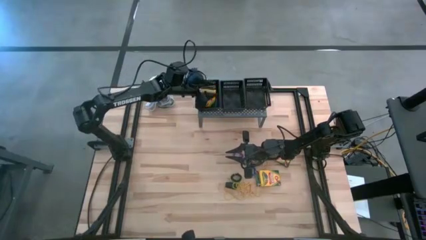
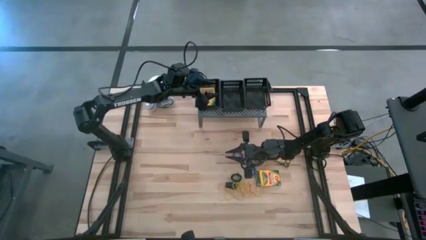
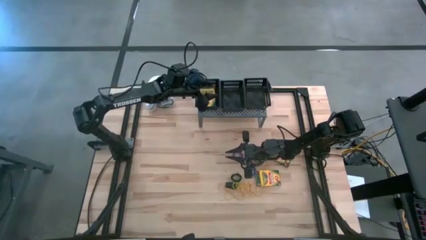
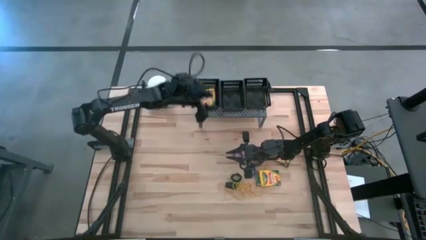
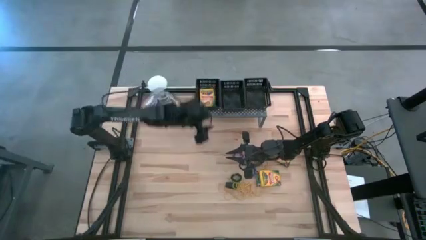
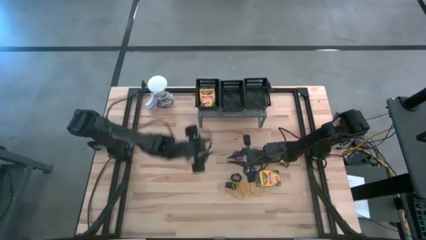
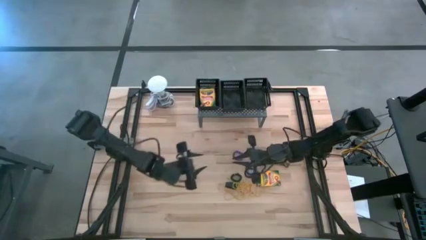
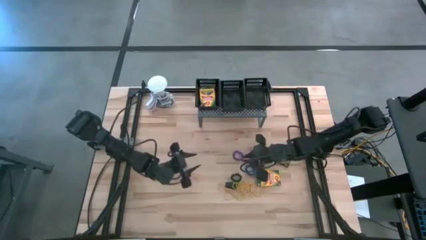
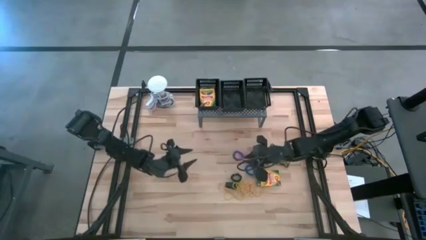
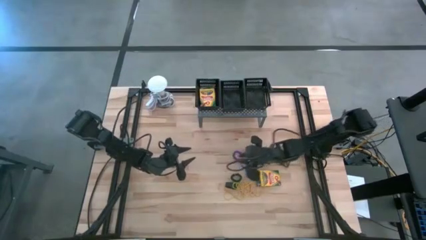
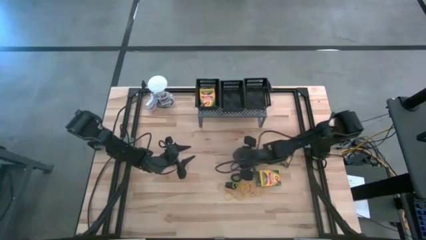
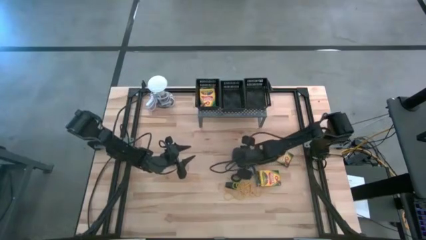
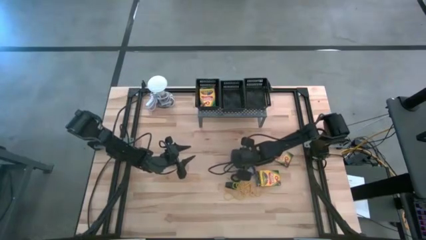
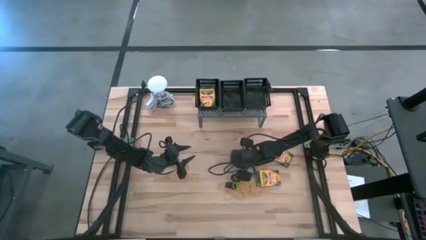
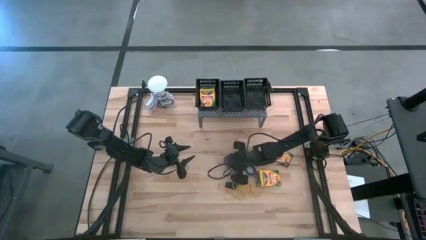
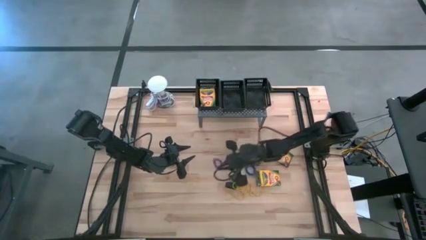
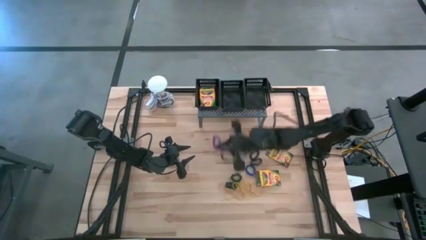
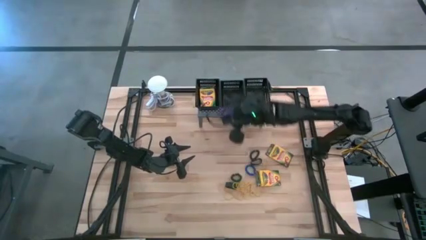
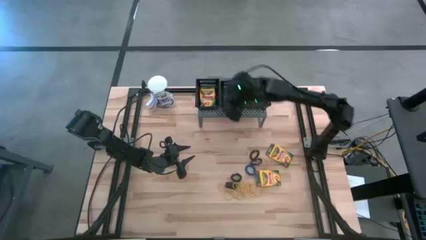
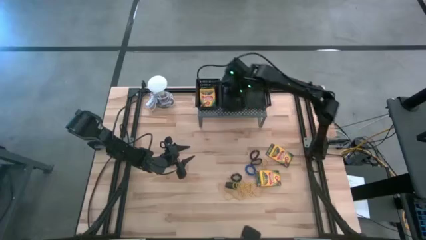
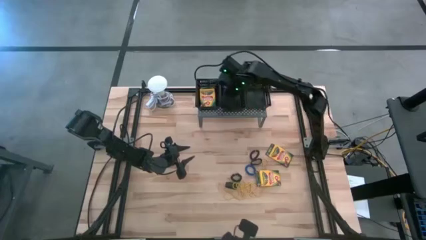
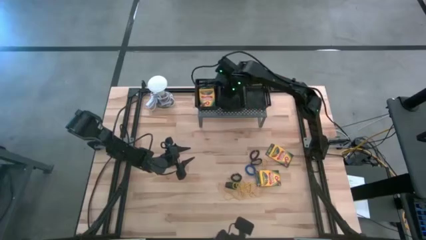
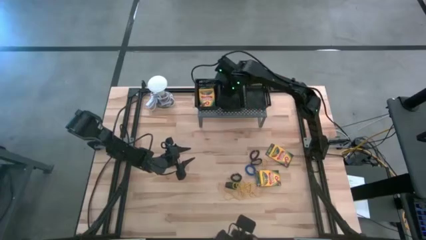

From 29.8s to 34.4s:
Task: Pick & Place Office Desk Supplies
Put the violet spring keychain into the middle black bin on the shelf

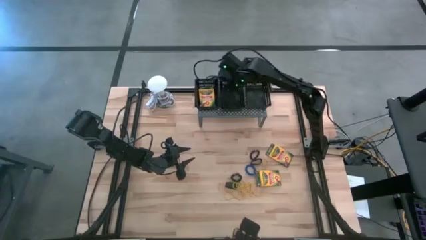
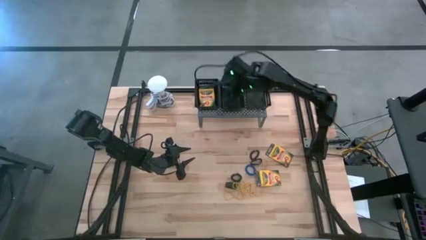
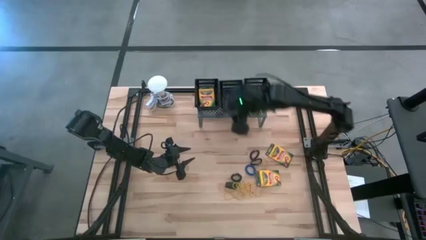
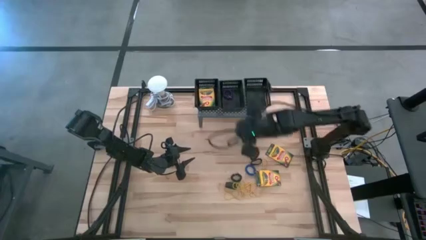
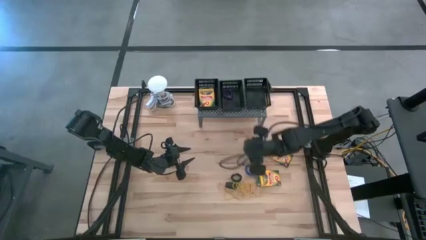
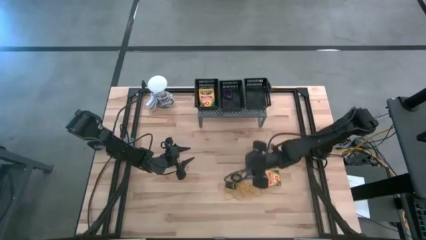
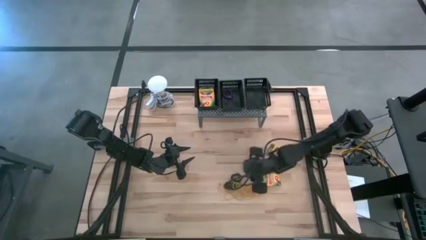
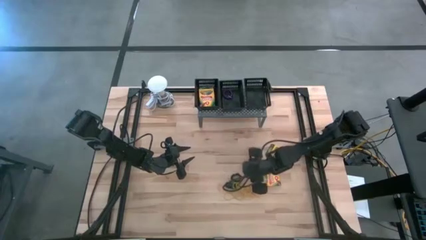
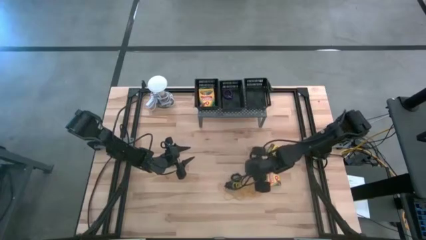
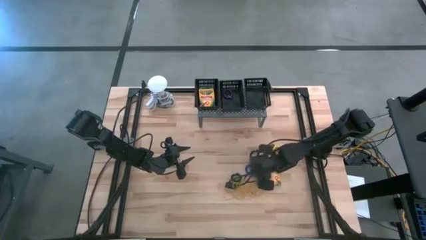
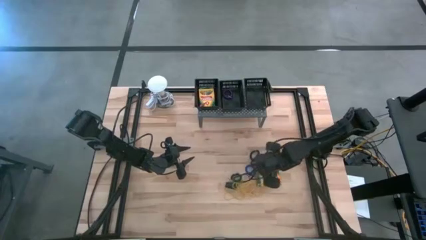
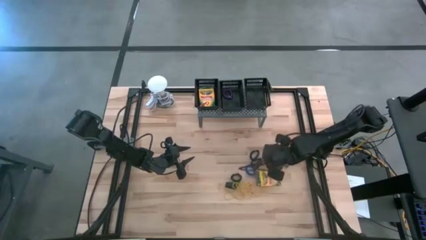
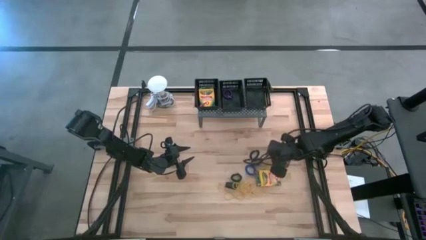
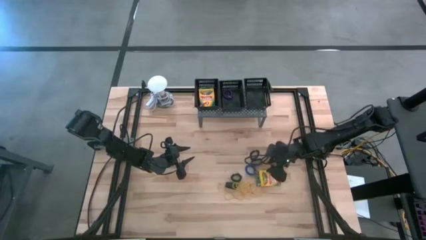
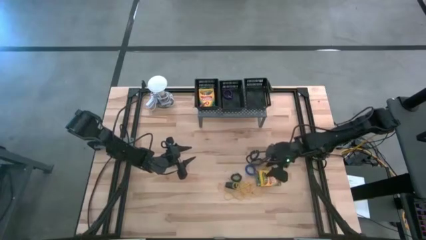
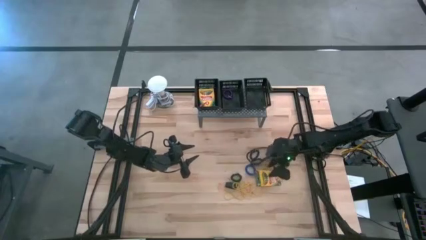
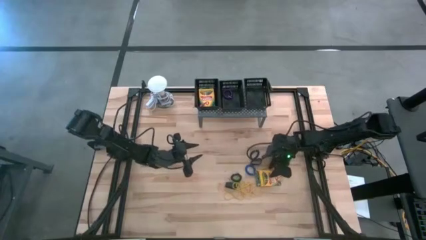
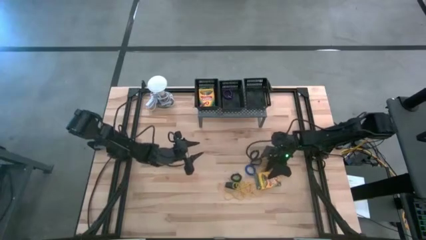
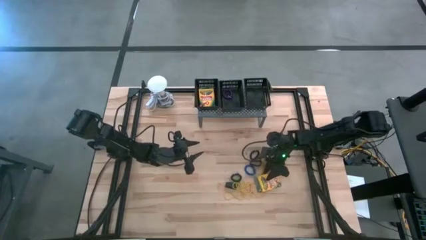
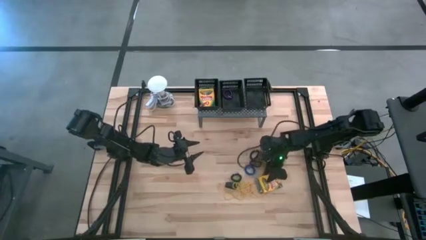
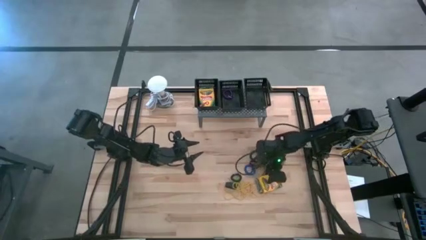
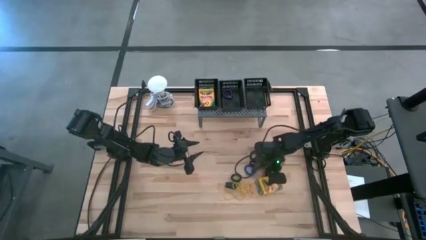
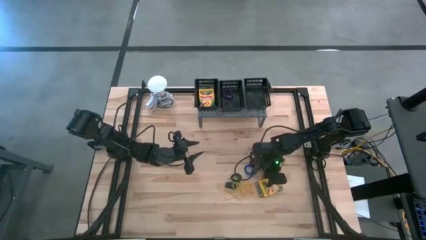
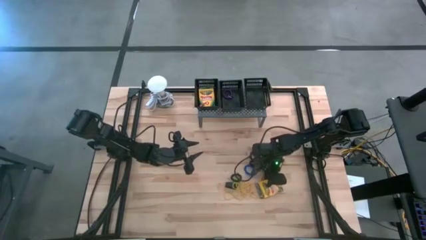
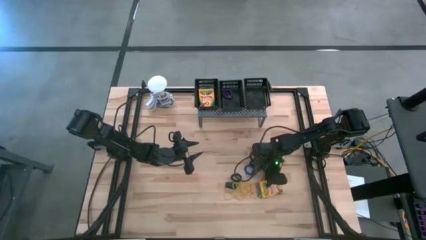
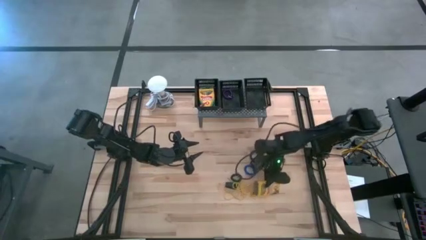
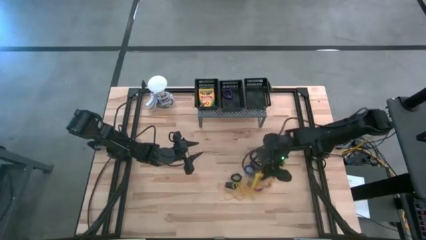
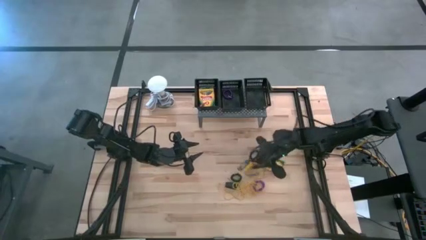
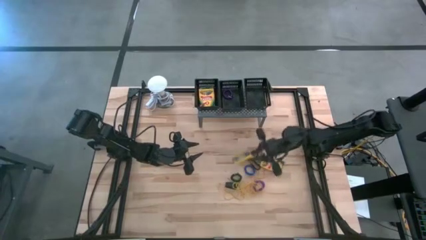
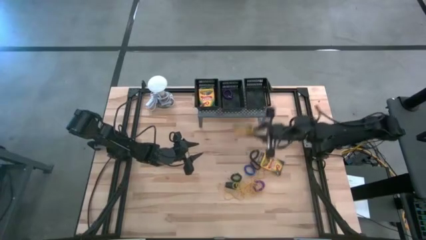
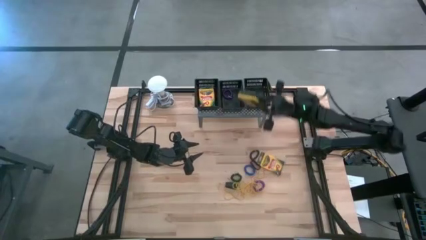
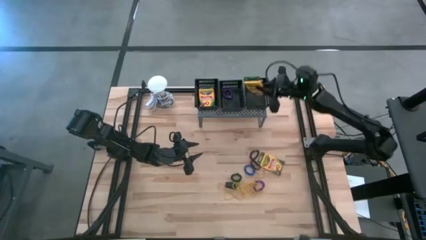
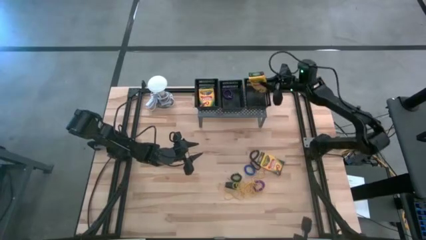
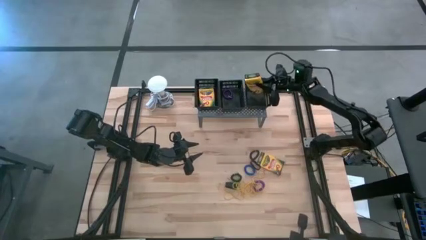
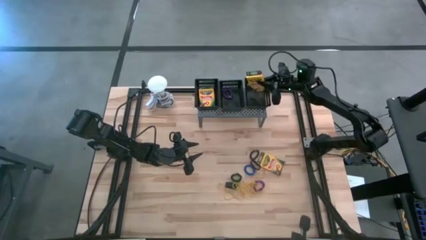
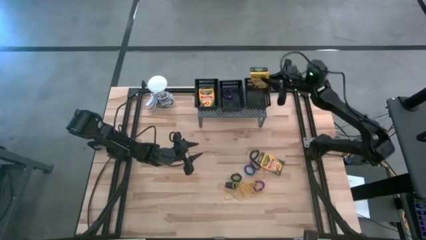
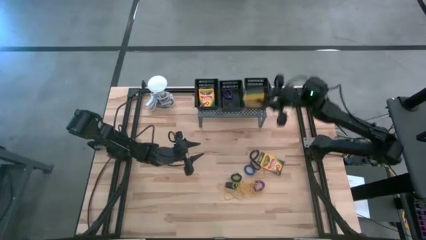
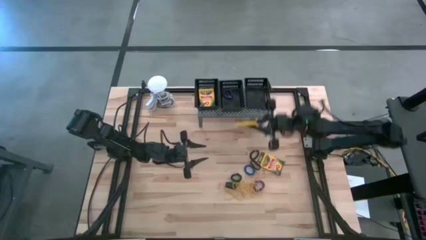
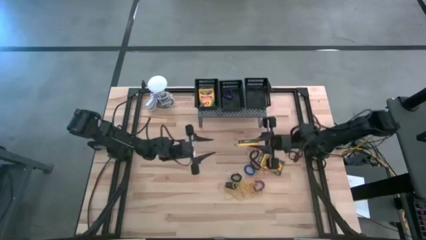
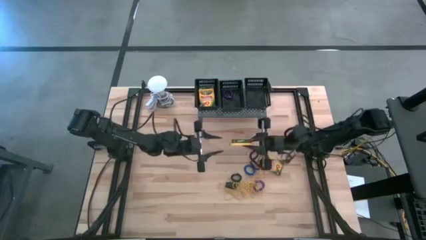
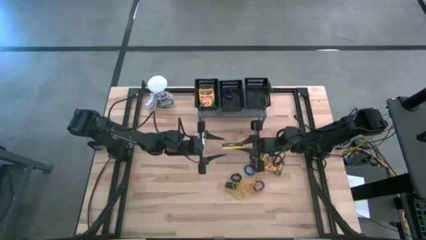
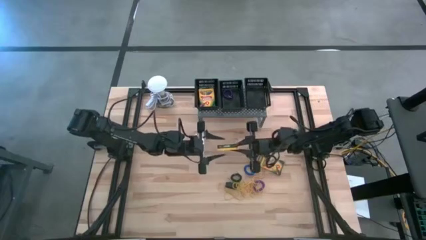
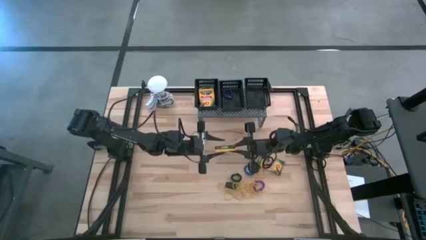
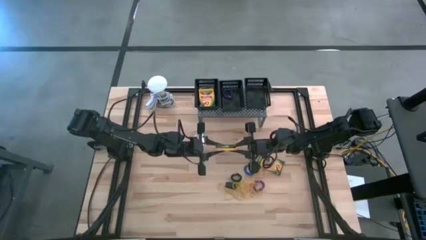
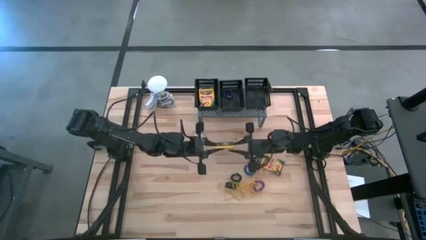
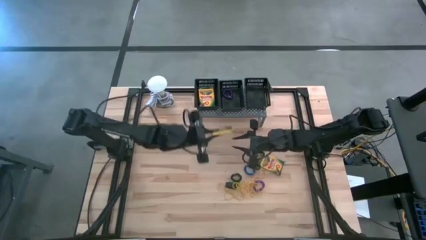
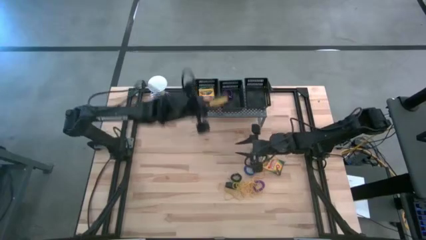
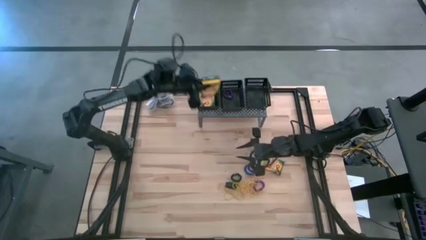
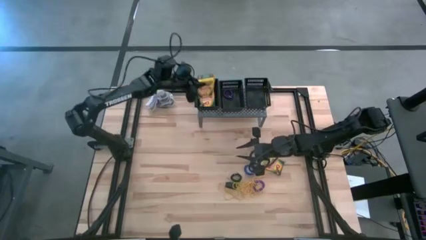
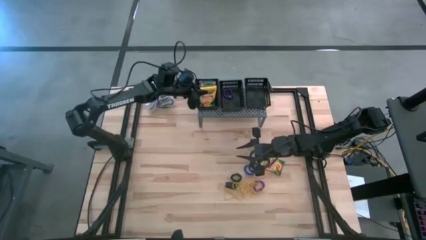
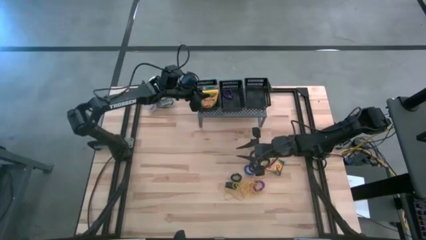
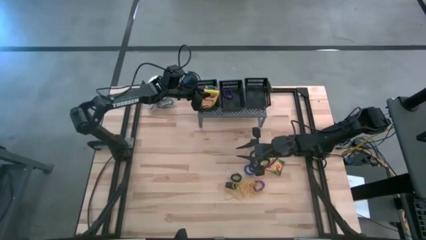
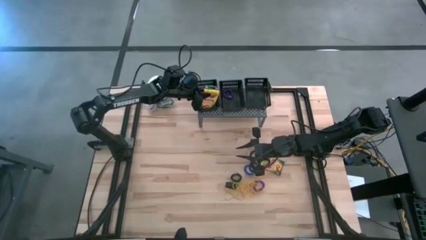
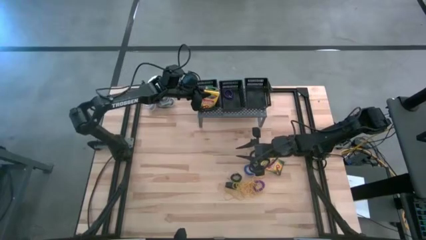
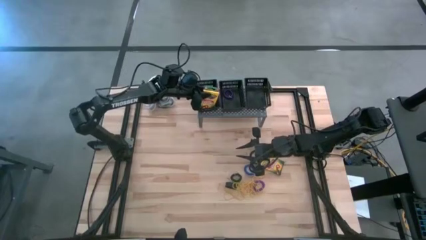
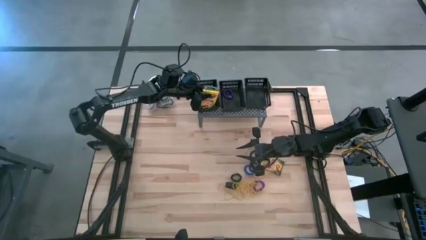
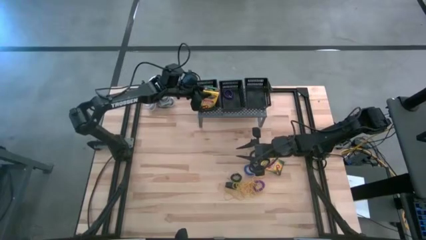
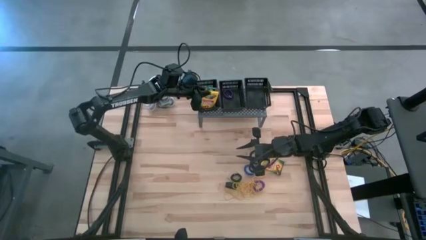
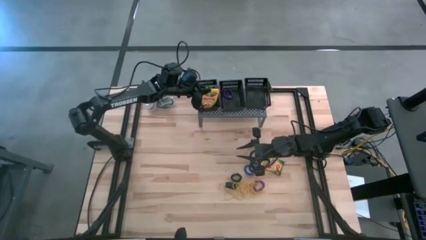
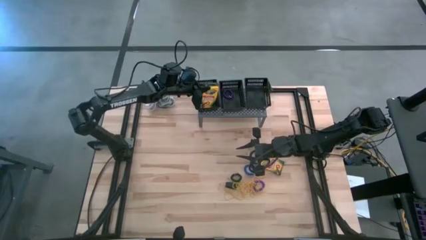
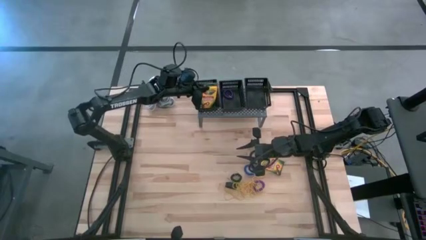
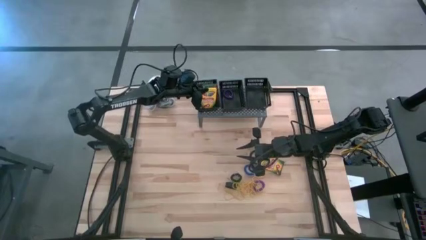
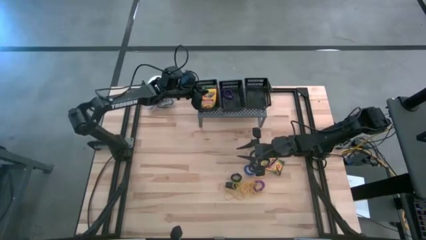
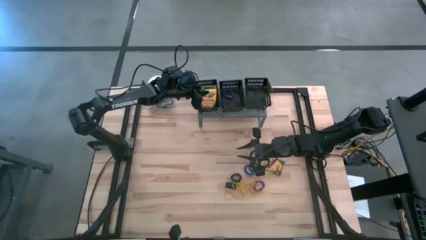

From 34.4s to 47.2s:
Put the yellow crayon box into the left black bin on the shelf
